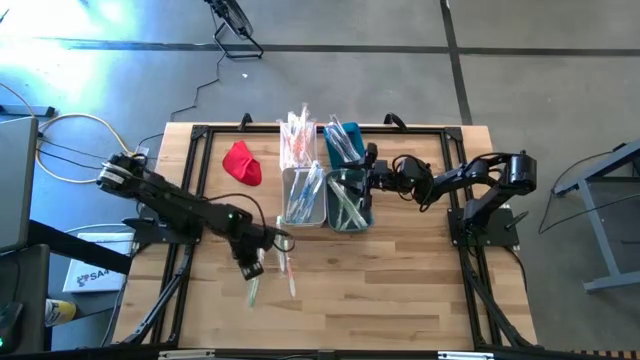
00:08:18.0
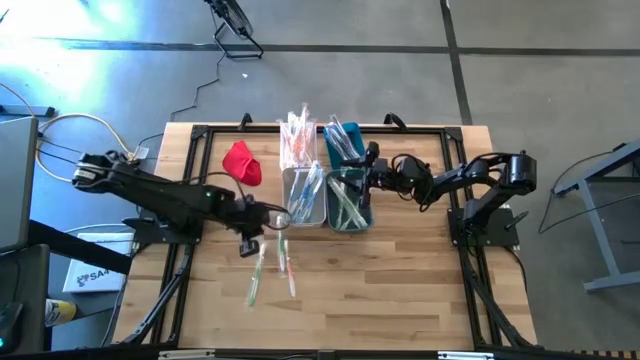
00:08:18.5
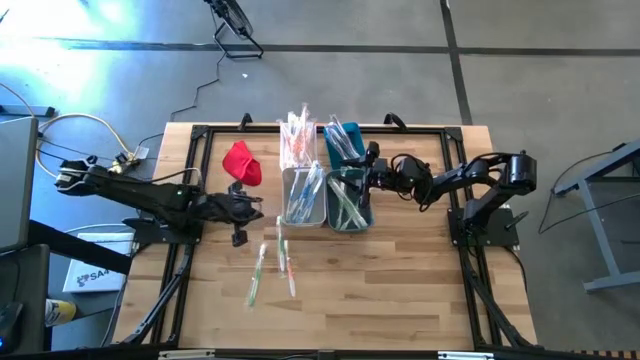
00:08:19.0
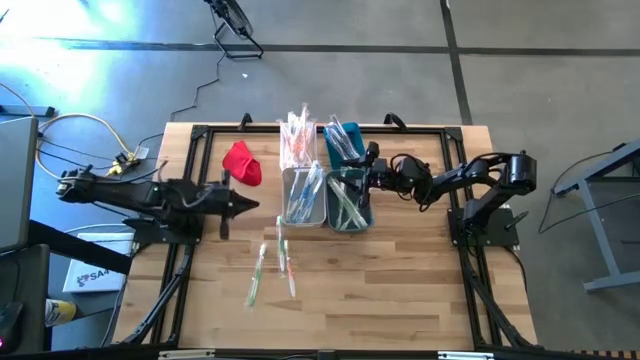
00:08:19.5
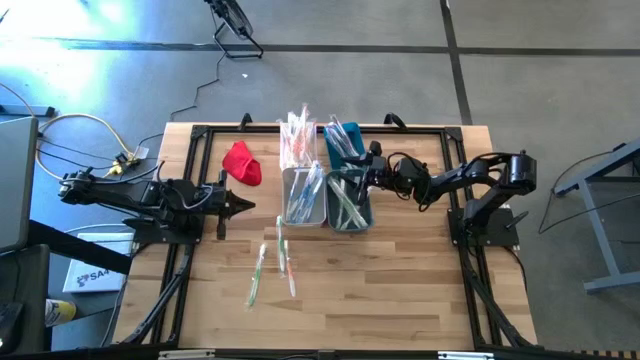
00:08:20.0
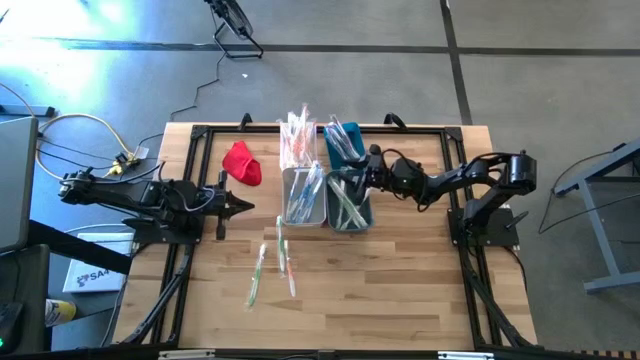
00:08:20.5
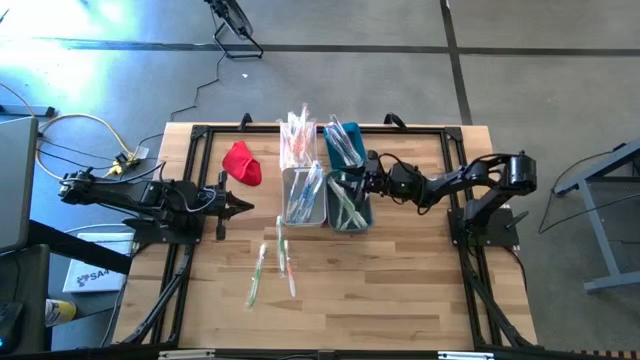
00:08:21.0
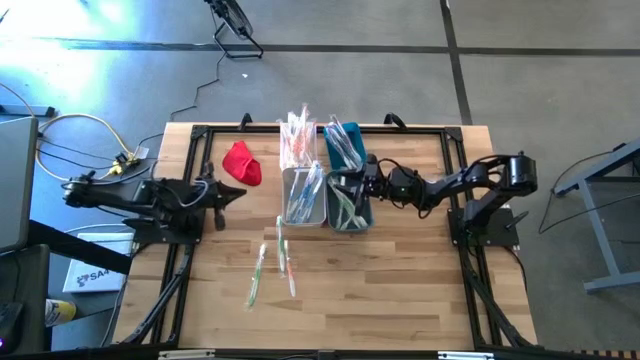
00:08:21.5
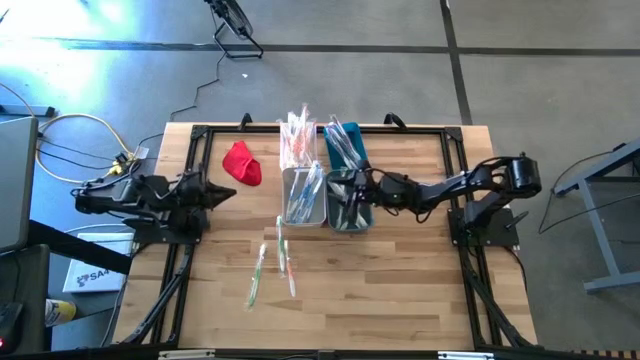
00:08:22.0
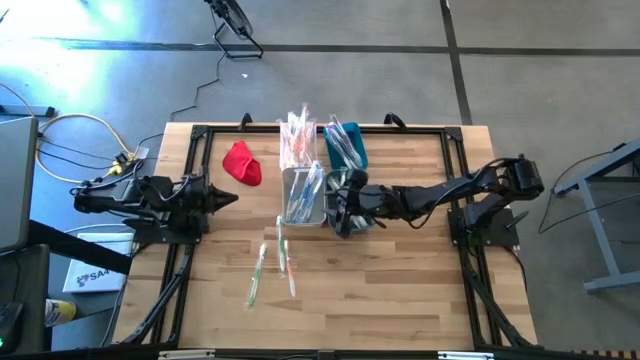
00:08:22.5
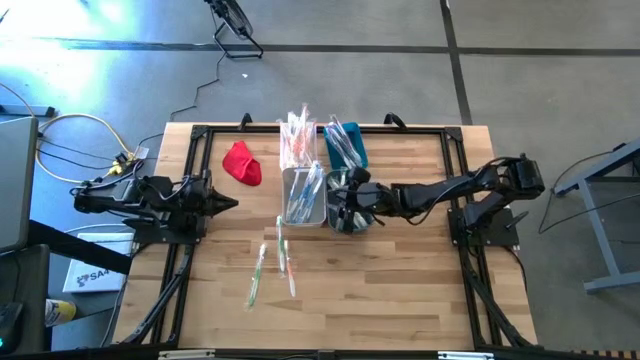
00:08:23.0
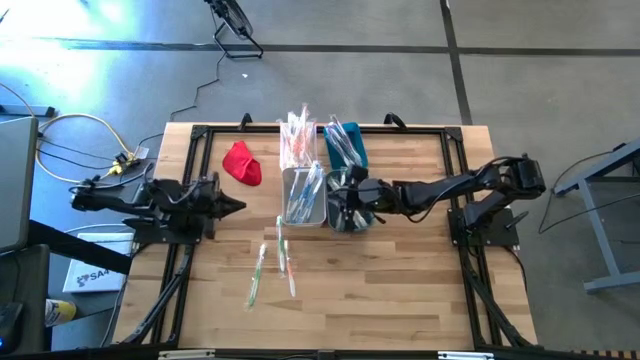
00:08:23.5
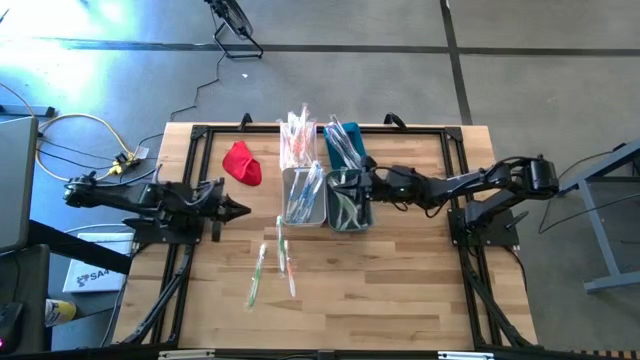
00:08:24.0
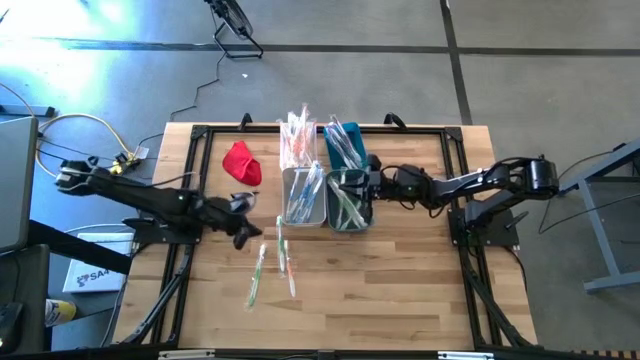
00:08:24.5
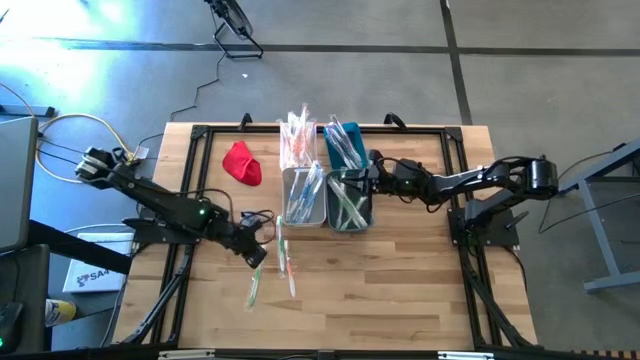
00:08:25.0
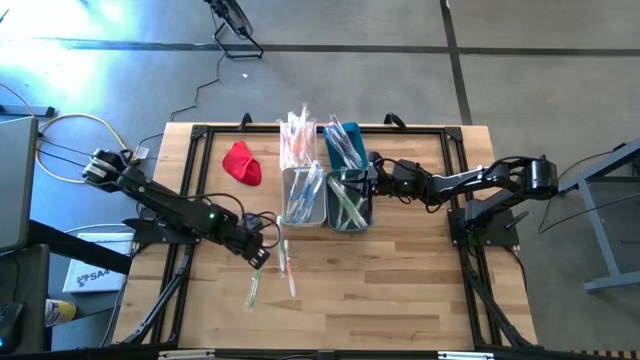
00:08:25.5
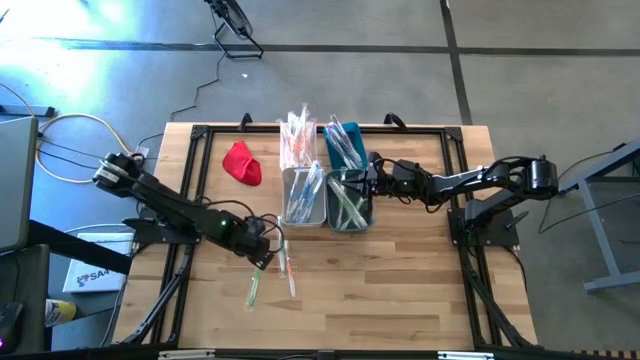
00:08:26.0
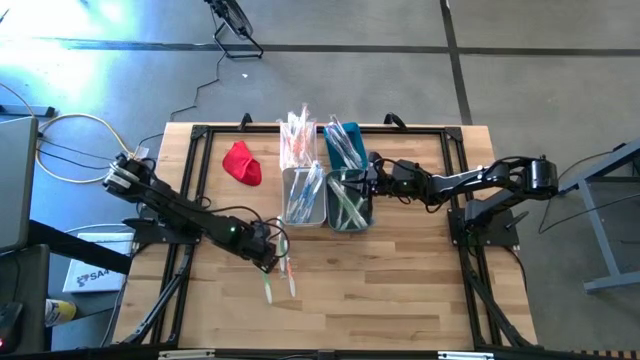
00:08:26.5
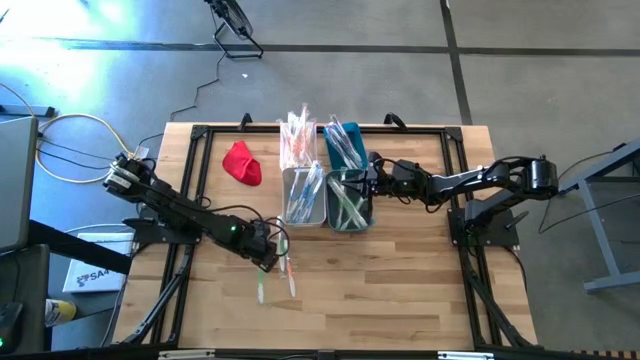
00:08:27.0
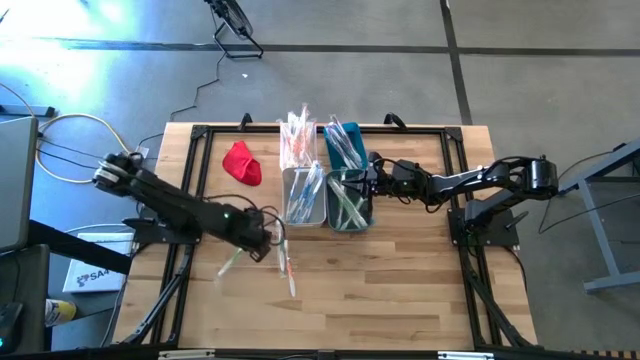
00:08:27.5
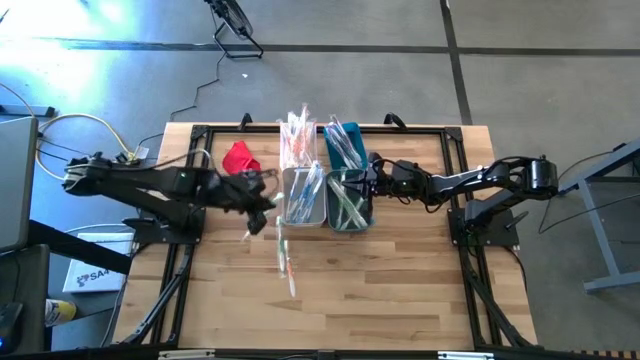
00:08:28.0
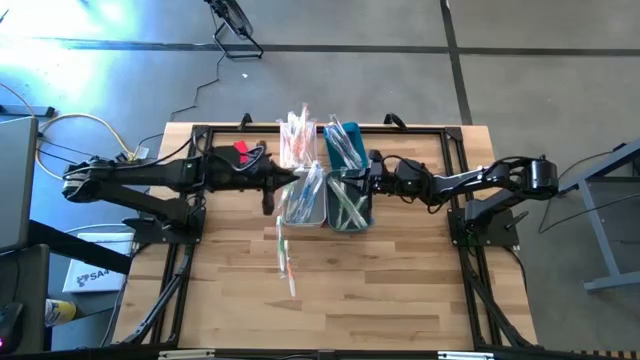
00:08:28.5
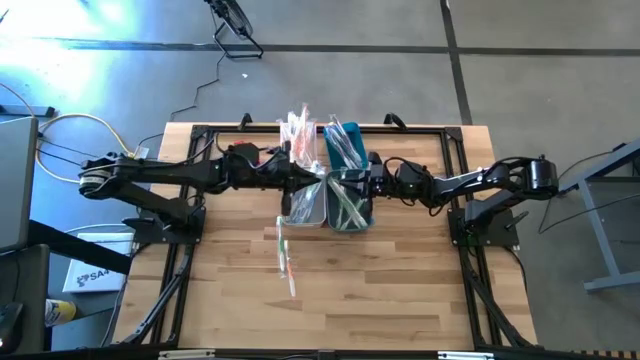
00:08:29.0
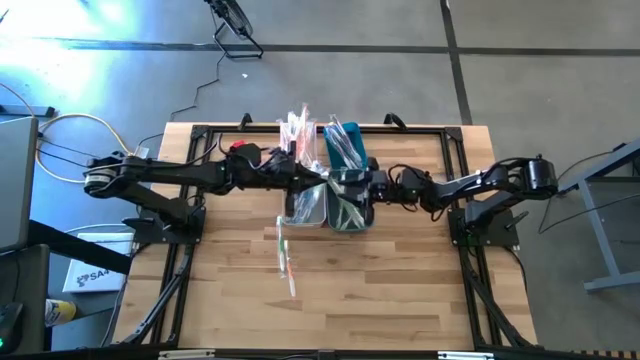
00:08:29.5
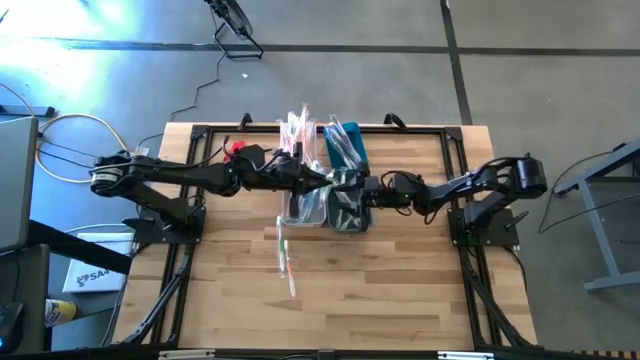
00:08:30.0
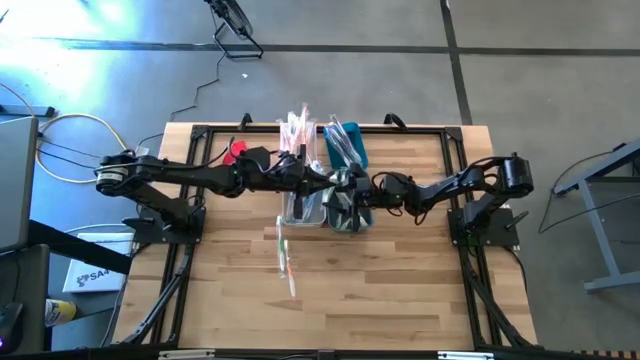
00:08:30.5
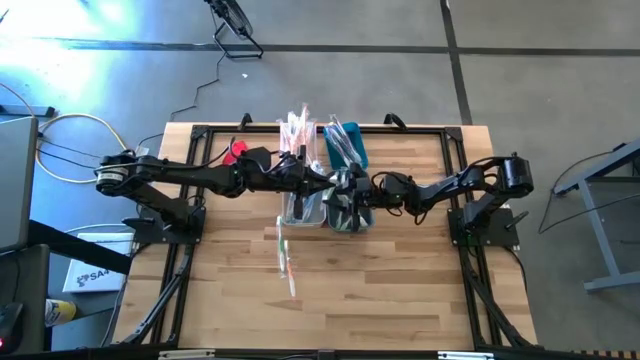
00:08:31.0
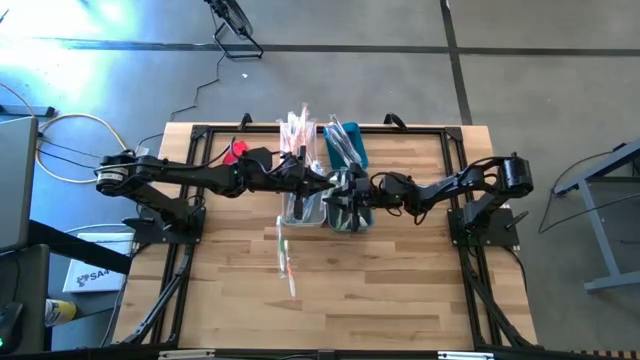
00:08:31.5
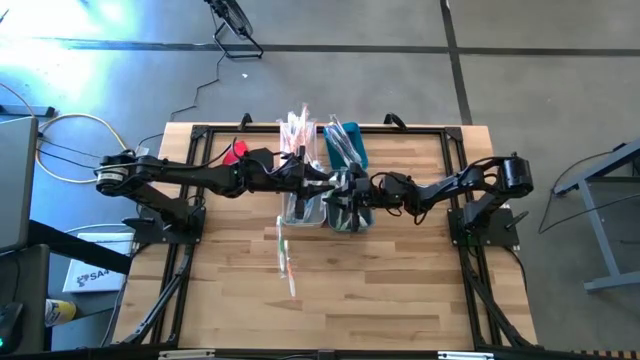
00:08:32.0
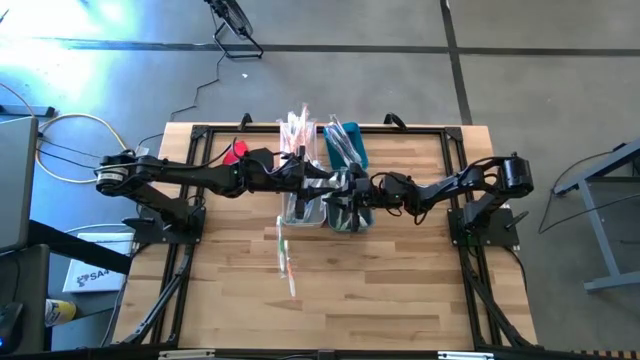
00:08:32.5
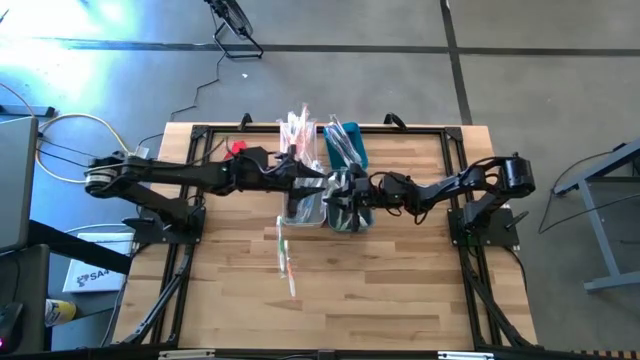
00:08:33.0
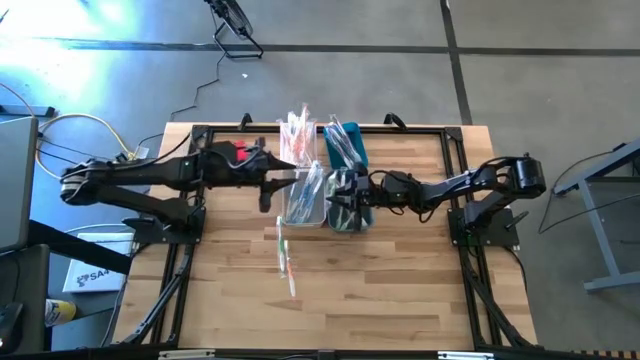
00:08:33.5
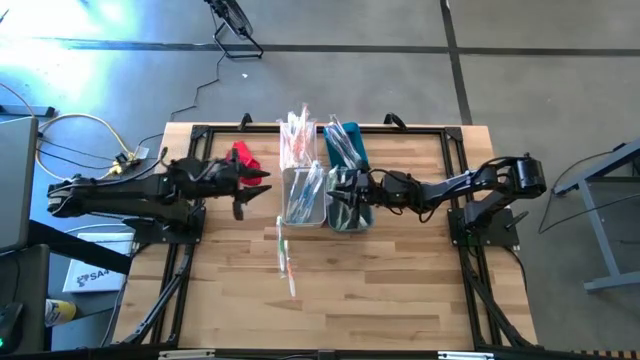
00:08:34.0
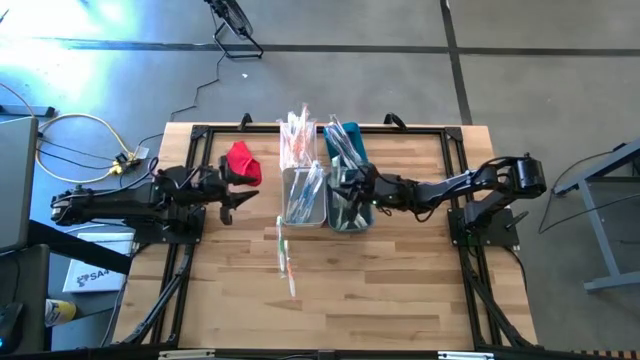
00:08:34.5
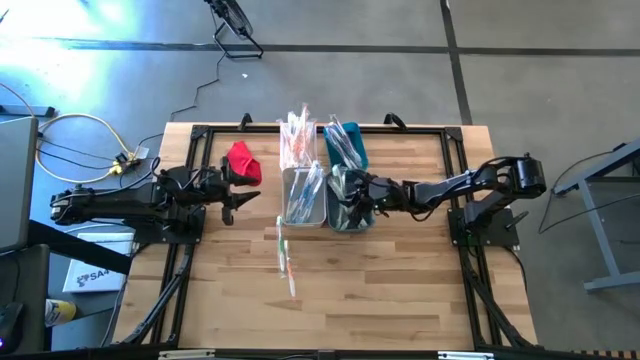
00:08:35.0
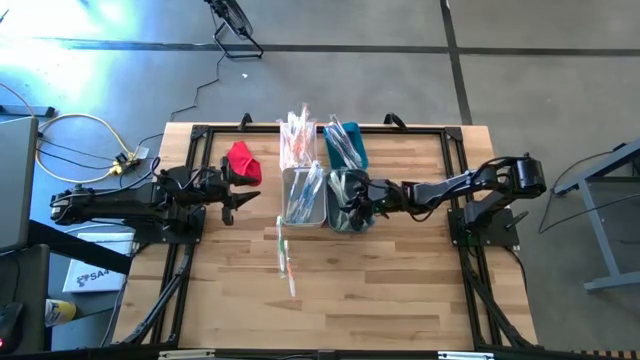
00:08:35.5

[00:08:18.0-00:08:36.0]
Task: Pick & Place Toothbrushes
Put the green toothbrush into the blue bin
